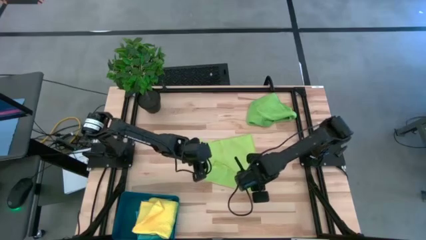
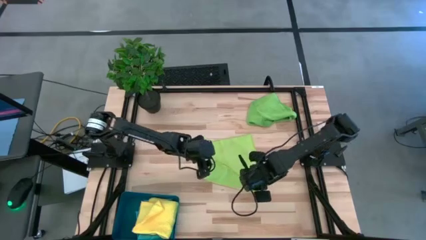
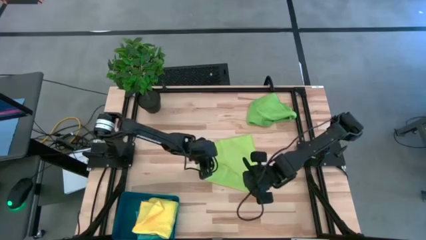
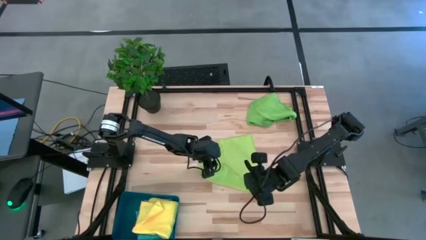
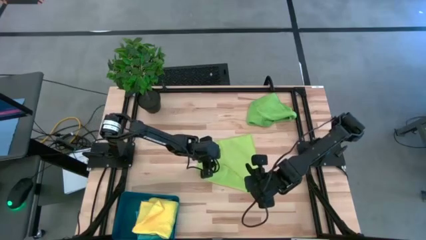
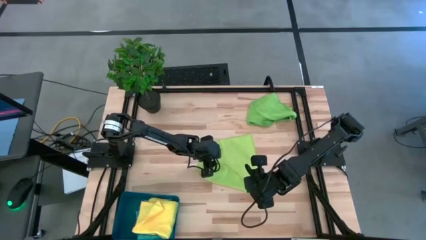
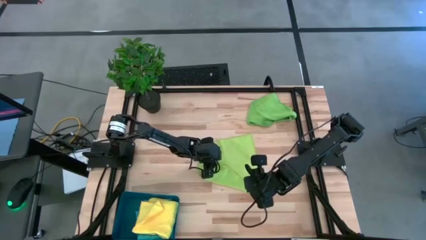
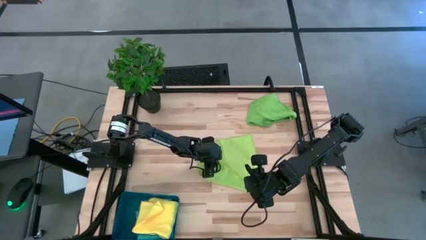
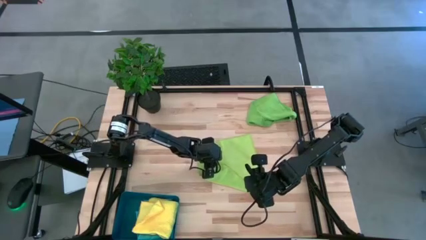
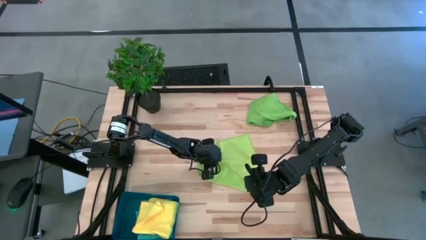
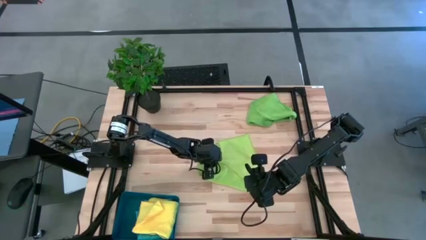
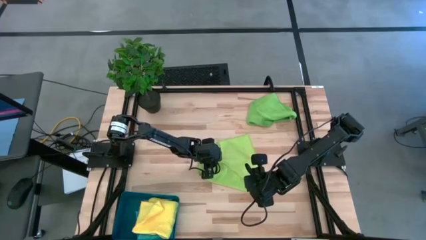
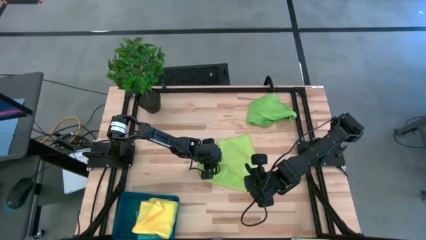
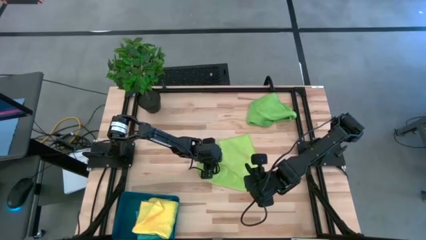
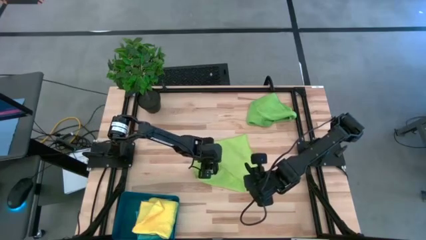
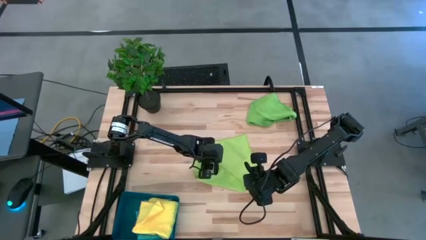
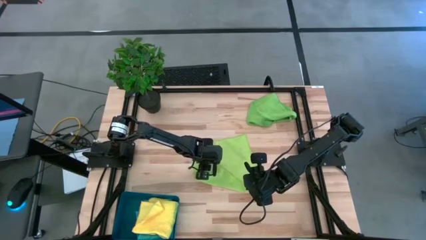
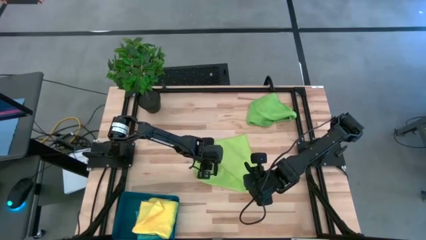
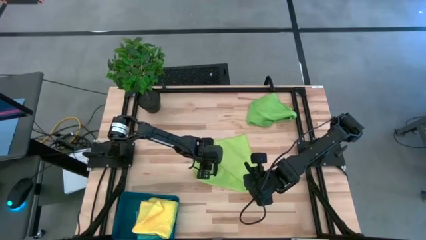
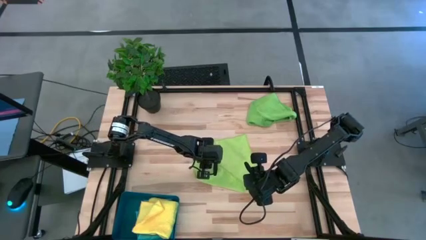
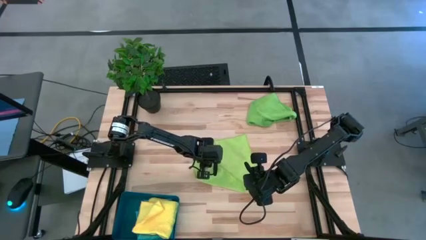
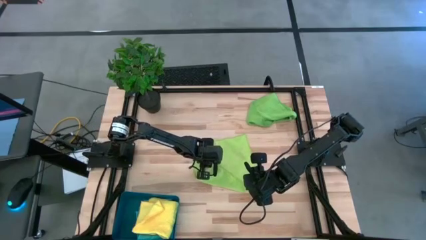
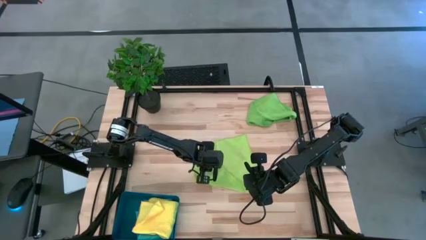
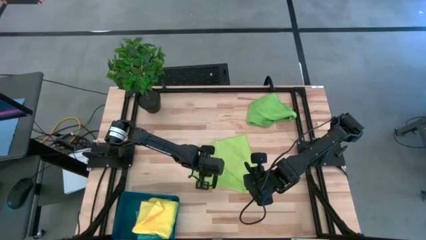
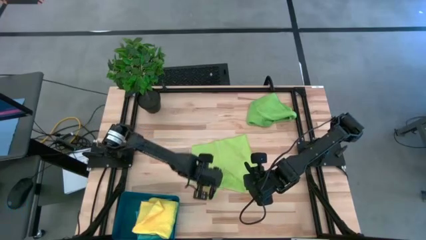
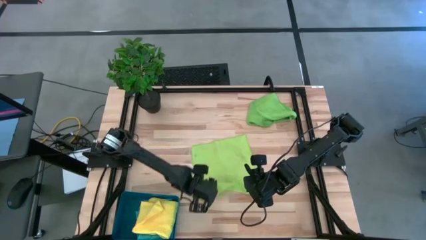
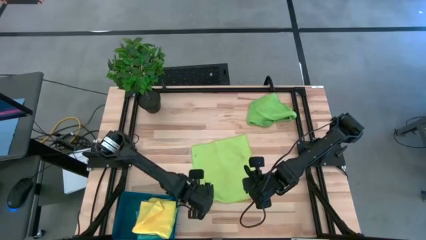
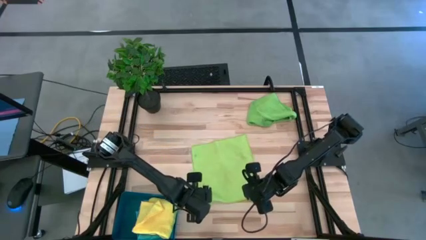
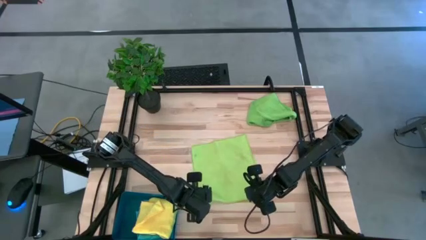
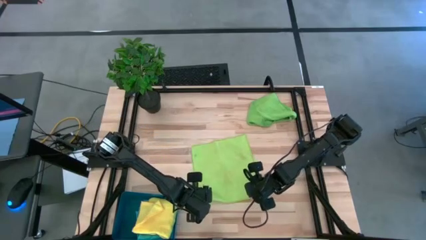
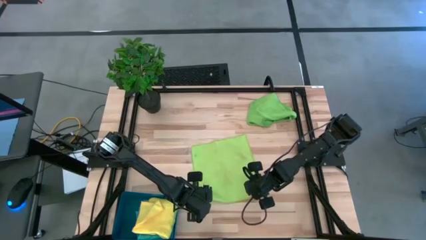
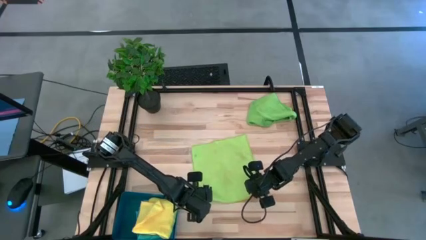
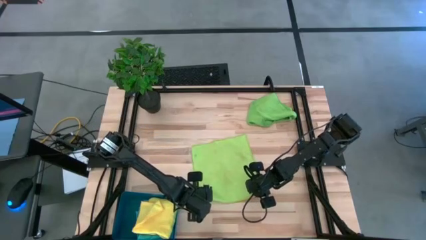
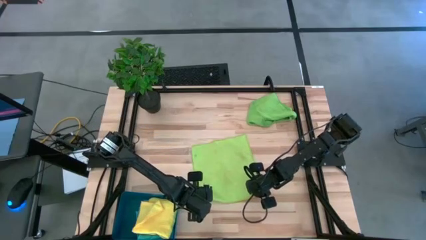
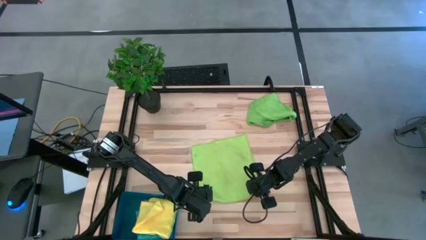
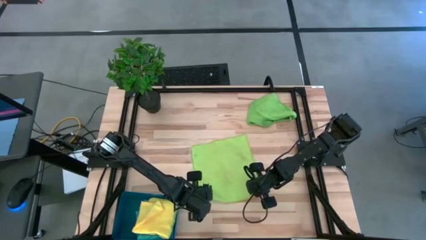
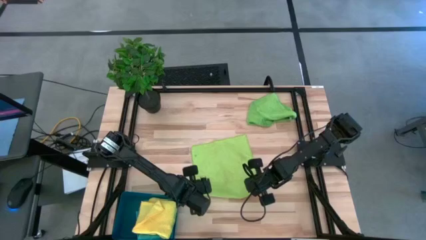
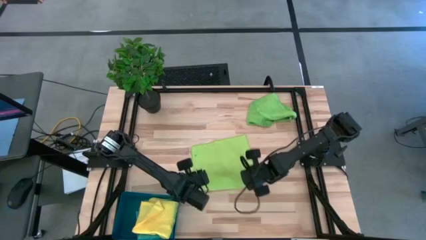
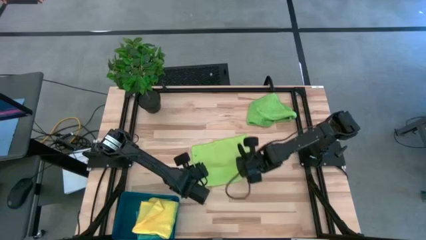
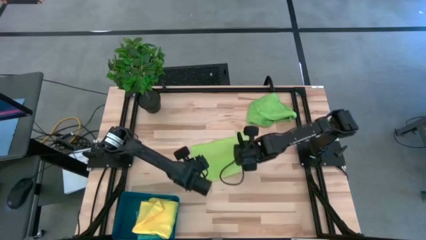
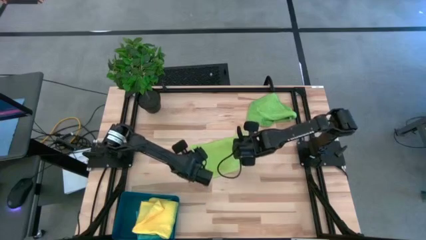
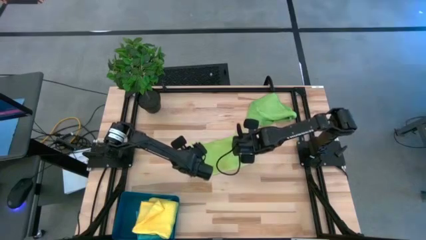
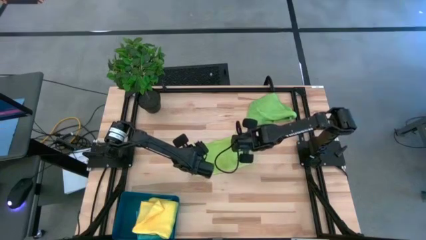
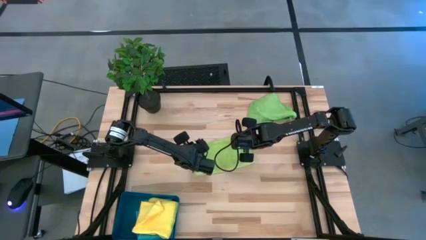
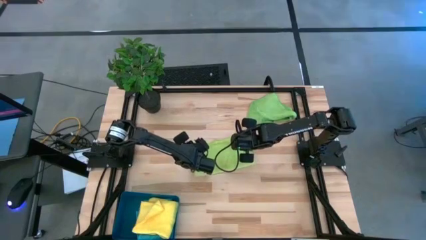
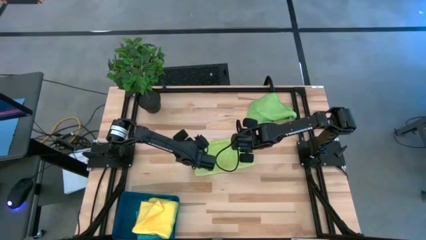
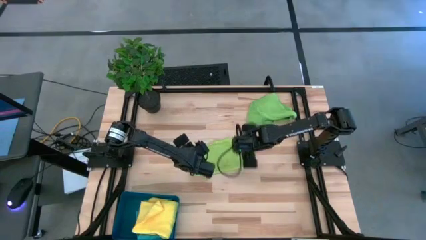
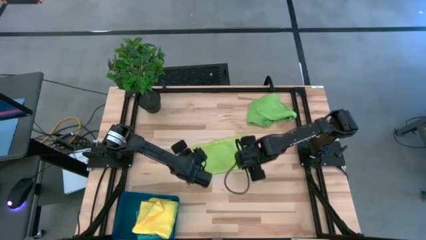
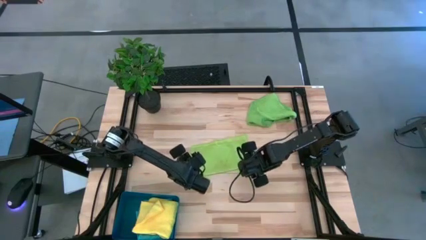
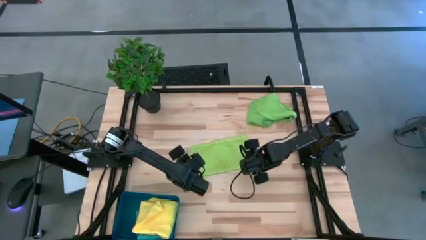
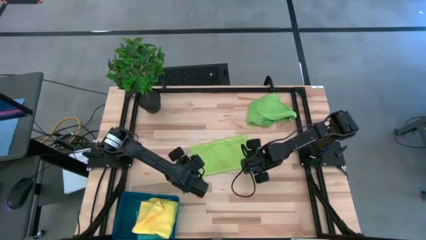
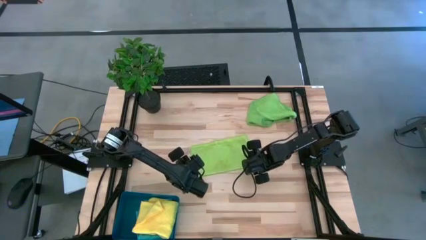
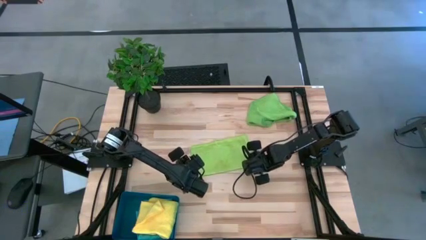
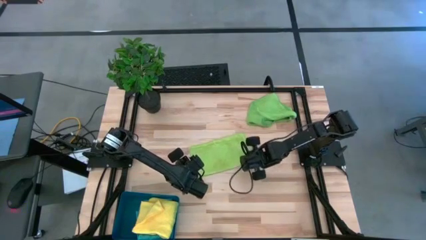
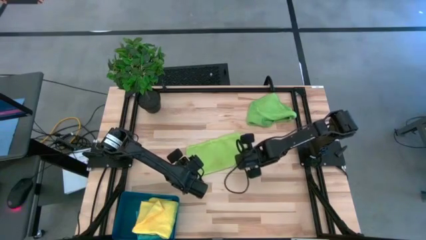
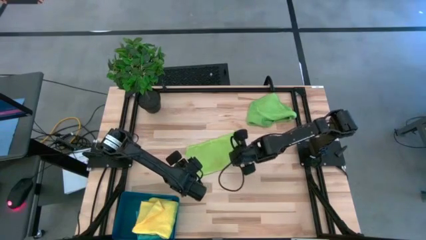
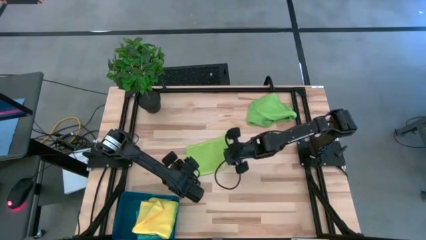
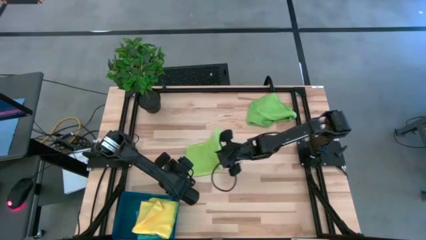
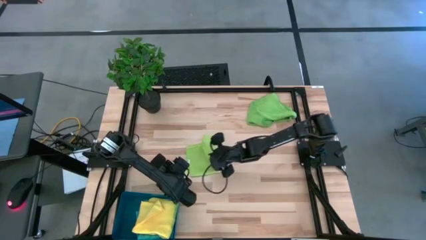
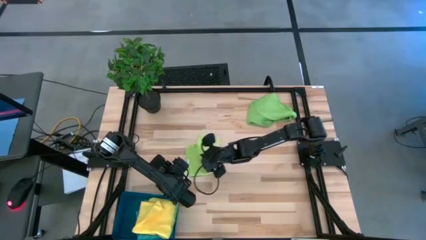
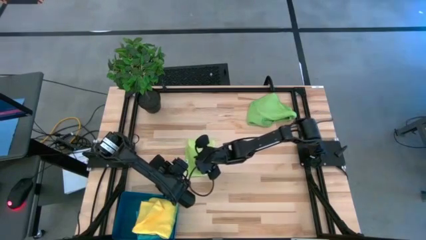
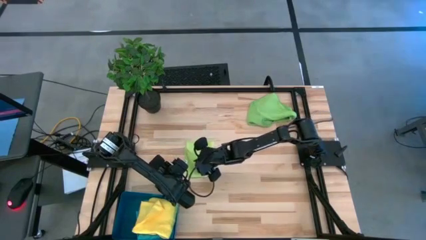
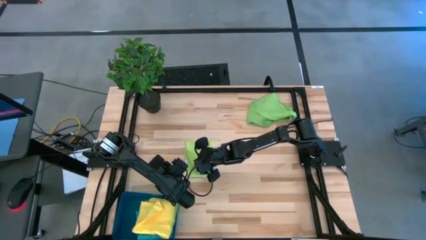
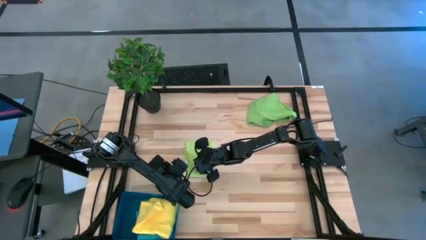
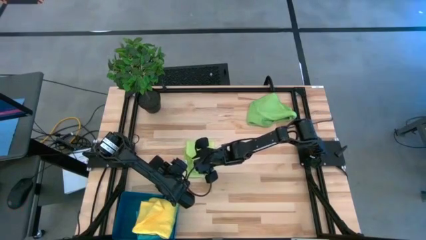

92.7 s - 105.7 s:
Task: Fold microfiber towels
Fold the light green microfiber towel

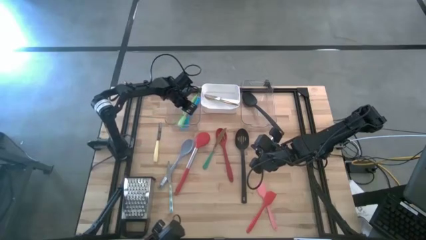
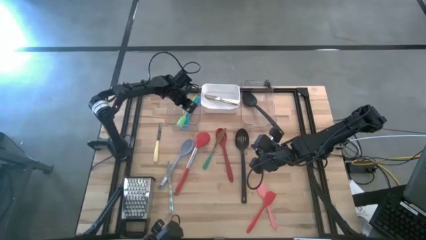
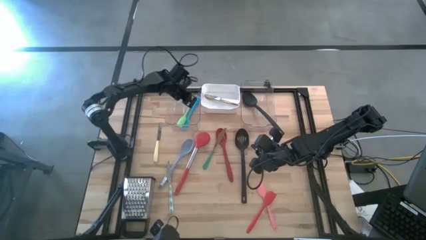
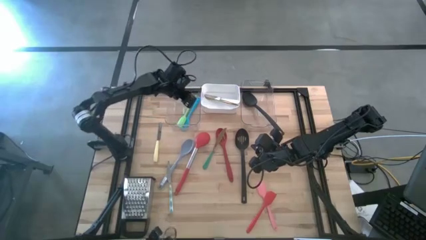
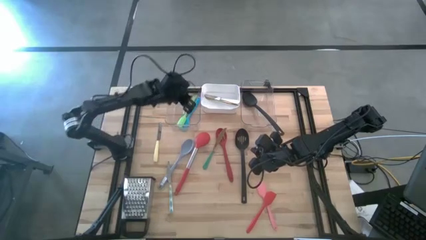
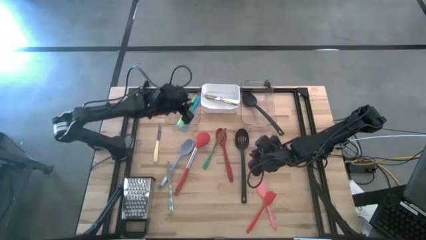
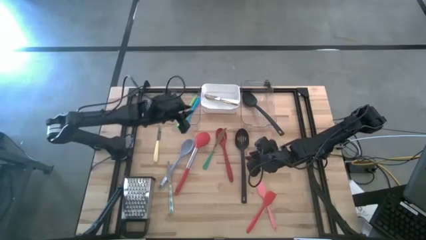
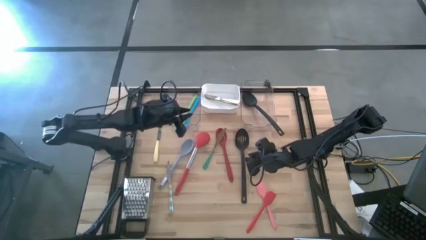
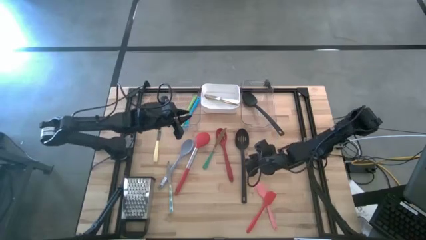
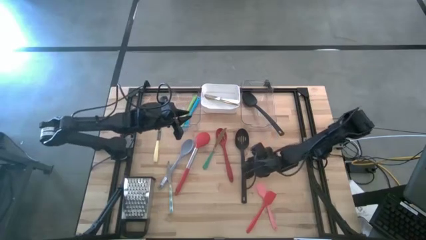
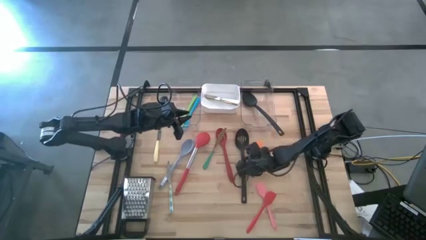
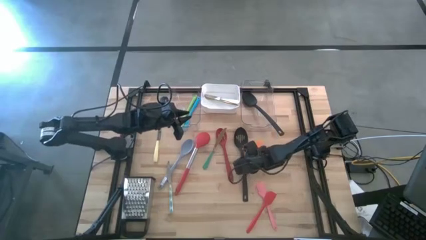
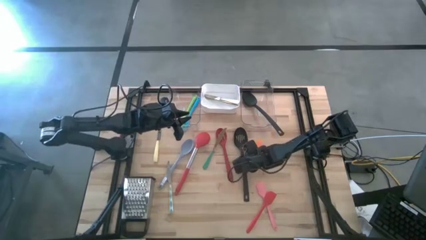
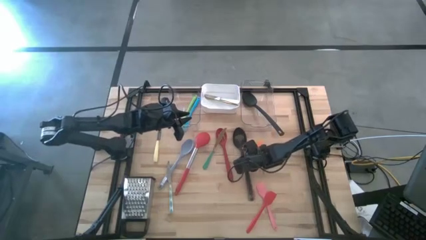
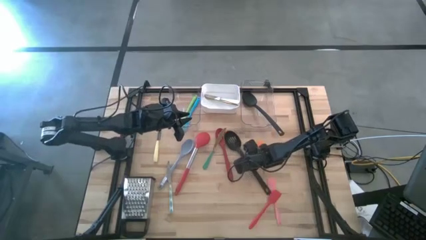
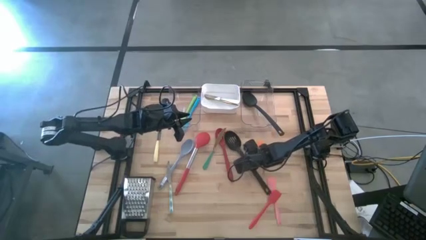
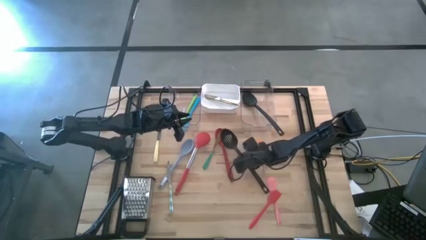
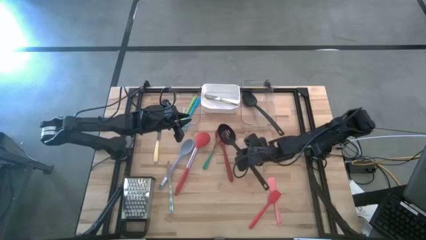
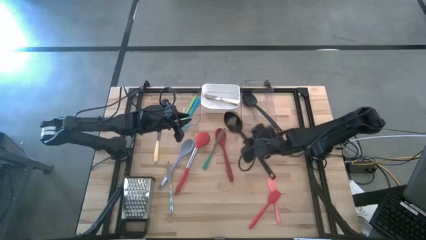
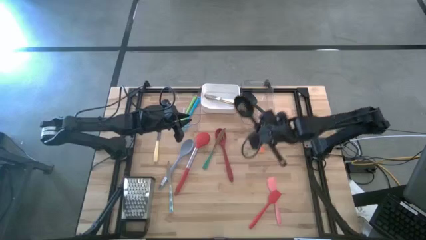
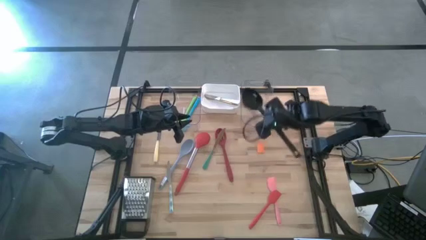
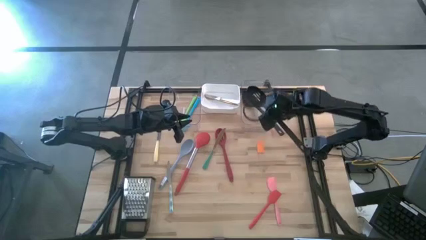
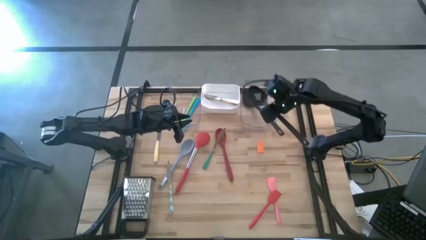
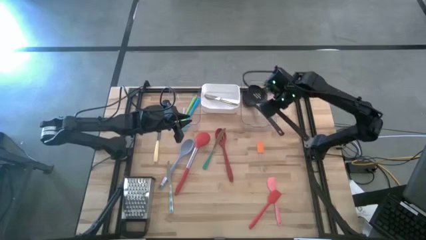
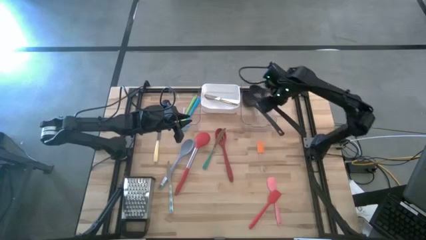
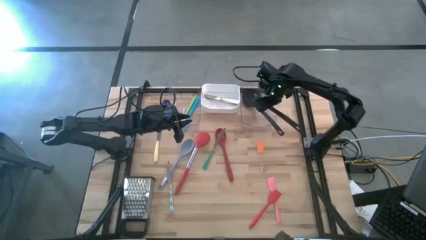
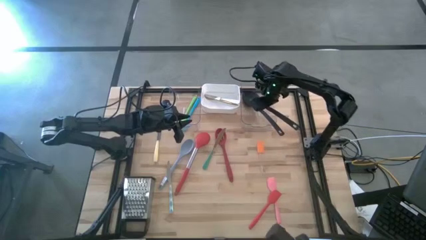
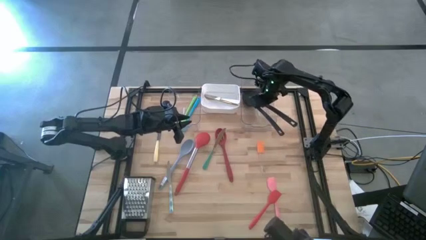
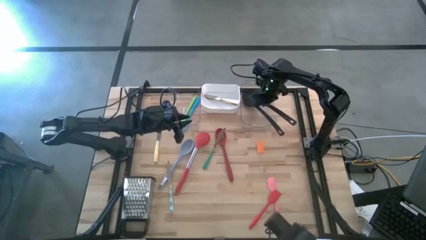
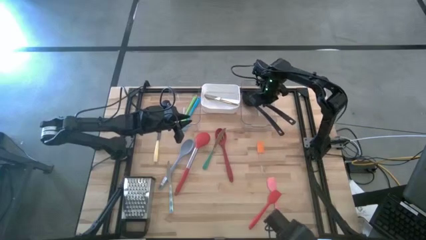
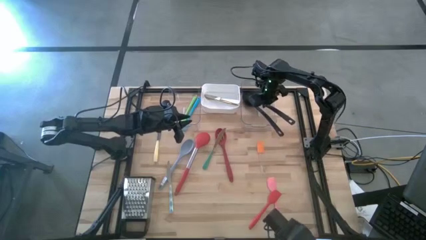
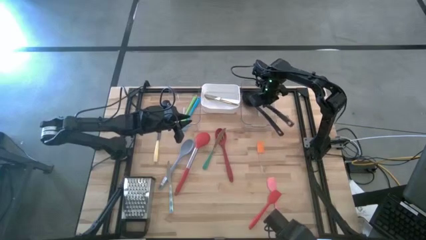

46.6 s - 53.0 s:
Task: Pick & Place Kitchen Items
Put the black serving spoon into the right transparent bin
